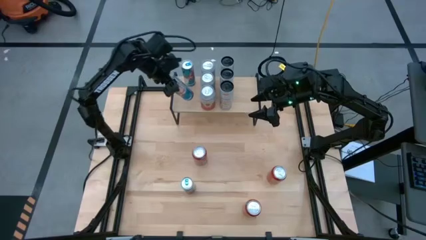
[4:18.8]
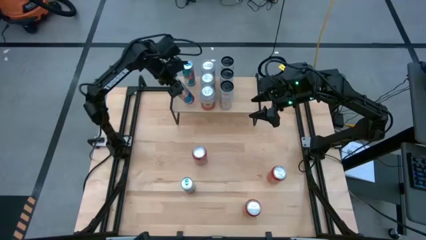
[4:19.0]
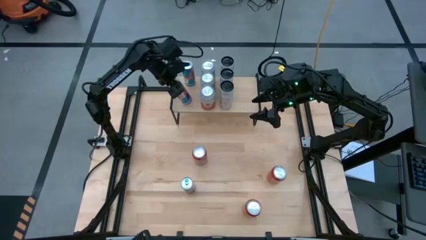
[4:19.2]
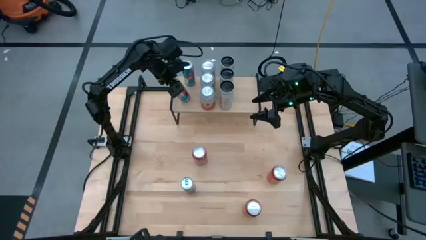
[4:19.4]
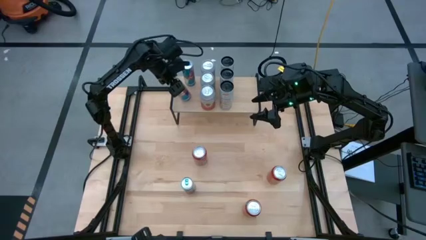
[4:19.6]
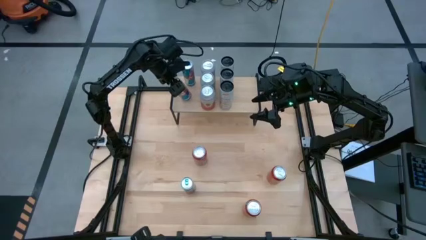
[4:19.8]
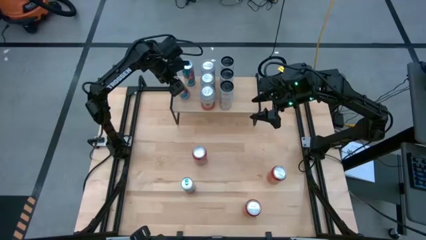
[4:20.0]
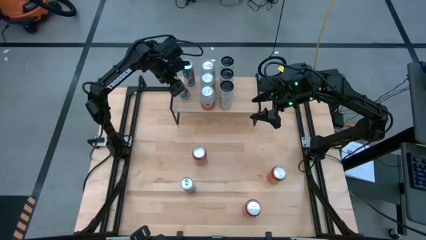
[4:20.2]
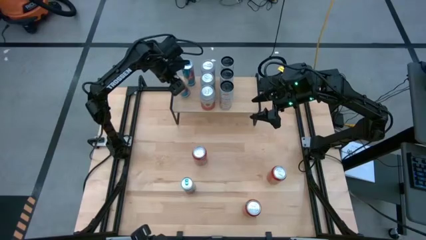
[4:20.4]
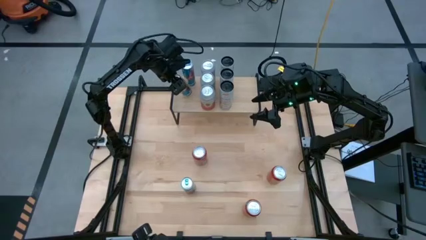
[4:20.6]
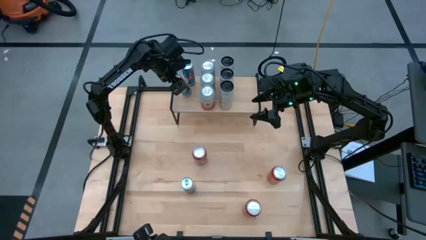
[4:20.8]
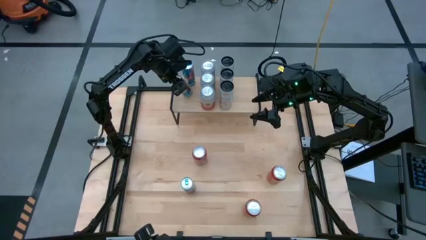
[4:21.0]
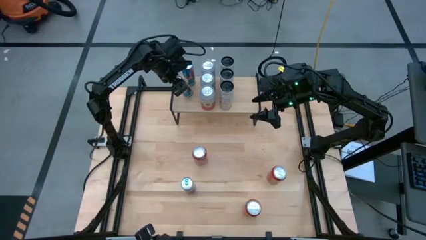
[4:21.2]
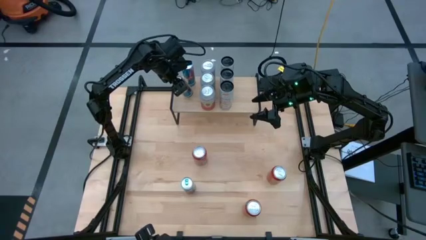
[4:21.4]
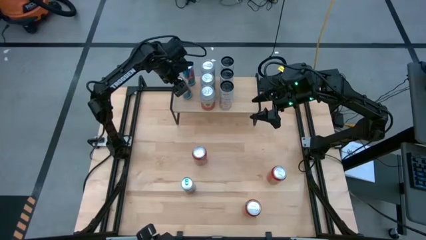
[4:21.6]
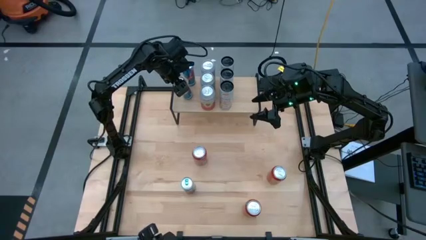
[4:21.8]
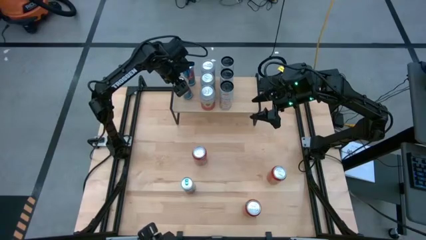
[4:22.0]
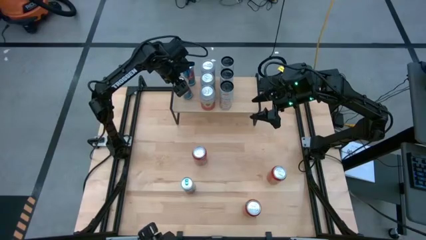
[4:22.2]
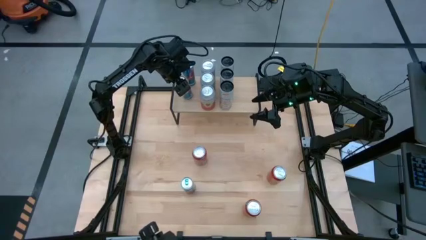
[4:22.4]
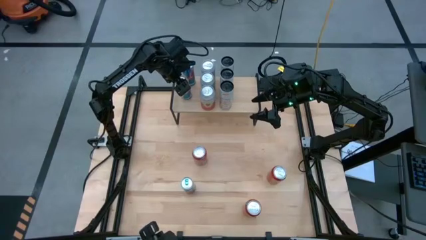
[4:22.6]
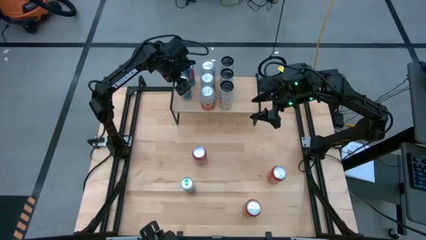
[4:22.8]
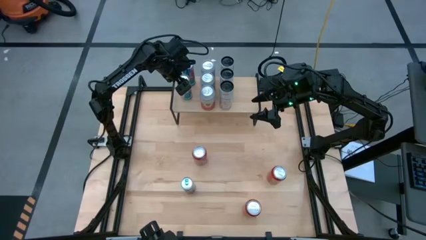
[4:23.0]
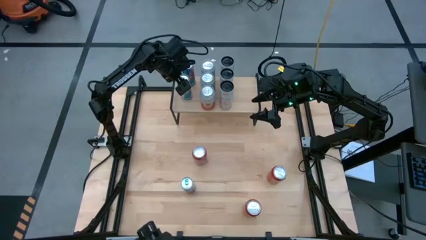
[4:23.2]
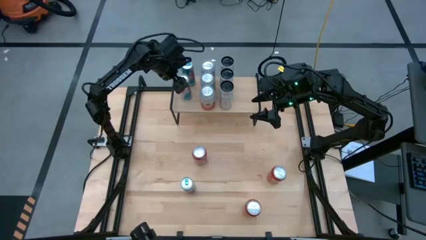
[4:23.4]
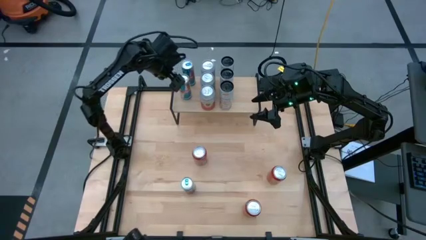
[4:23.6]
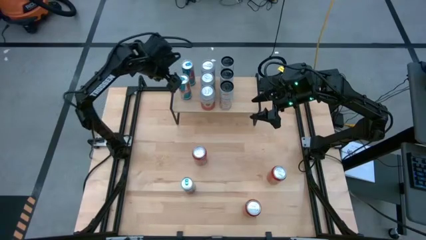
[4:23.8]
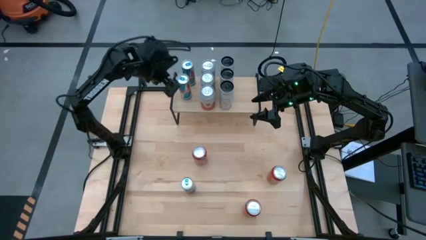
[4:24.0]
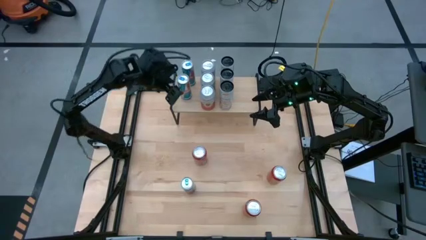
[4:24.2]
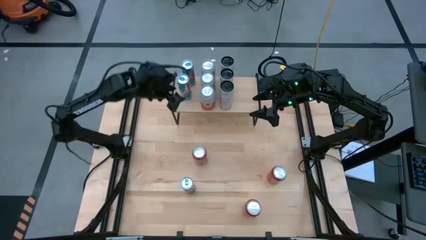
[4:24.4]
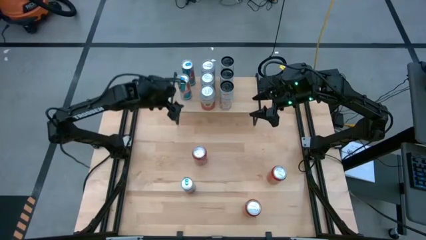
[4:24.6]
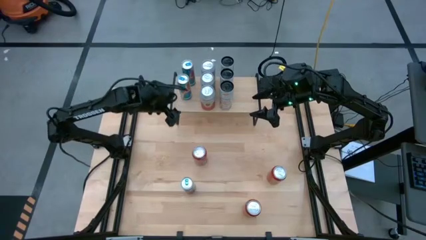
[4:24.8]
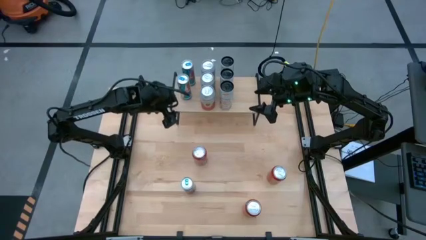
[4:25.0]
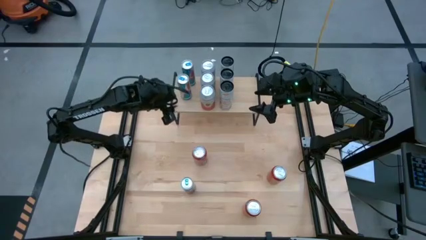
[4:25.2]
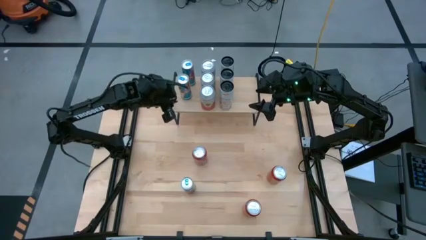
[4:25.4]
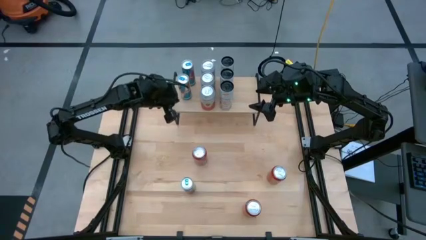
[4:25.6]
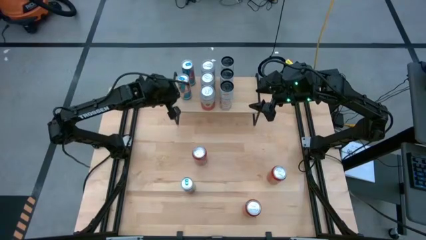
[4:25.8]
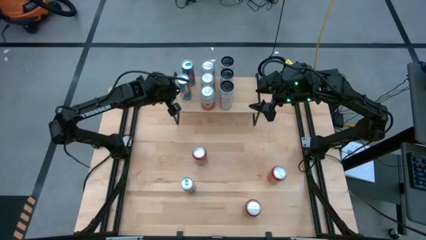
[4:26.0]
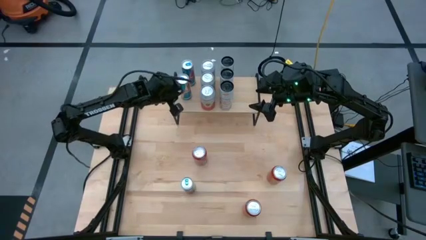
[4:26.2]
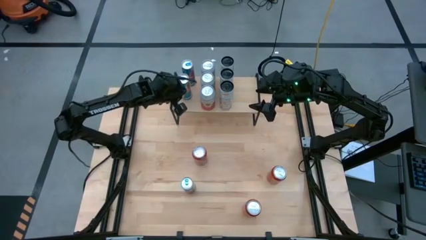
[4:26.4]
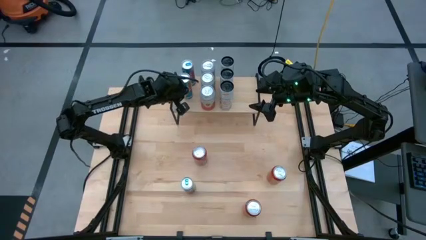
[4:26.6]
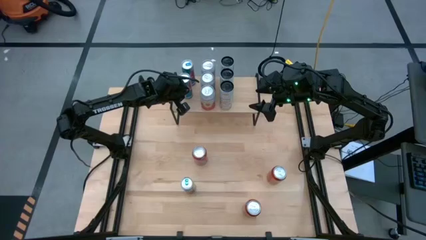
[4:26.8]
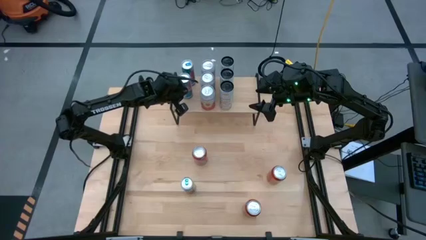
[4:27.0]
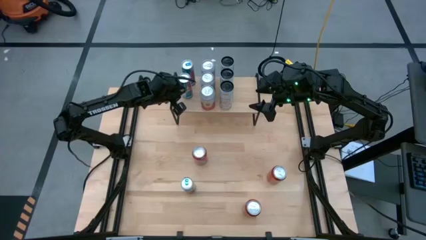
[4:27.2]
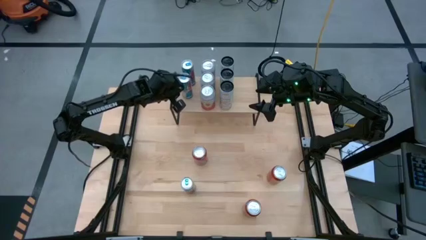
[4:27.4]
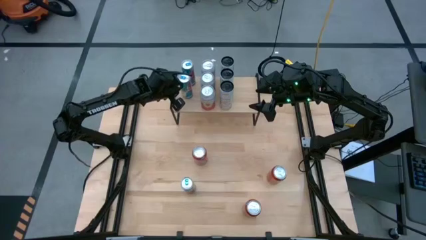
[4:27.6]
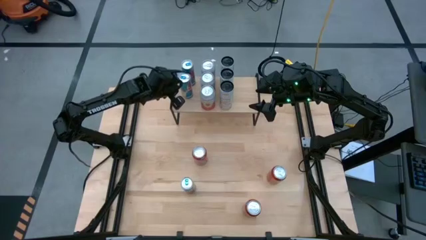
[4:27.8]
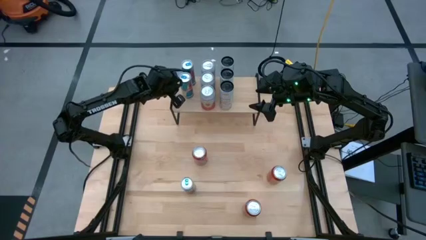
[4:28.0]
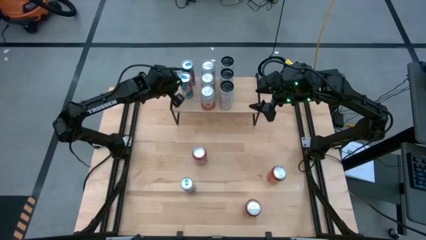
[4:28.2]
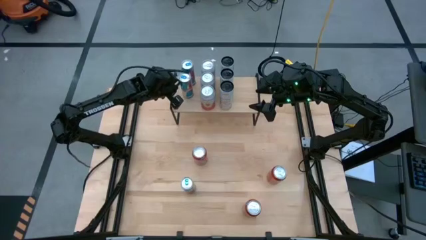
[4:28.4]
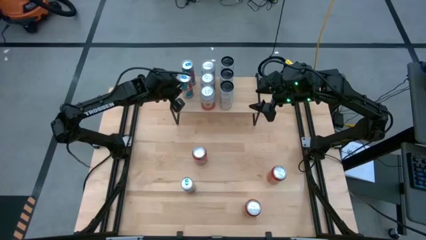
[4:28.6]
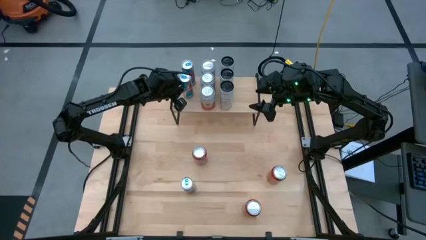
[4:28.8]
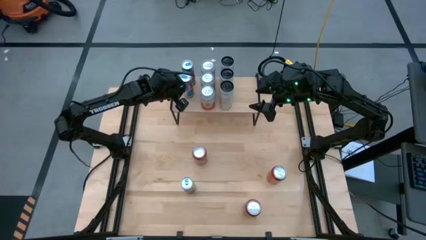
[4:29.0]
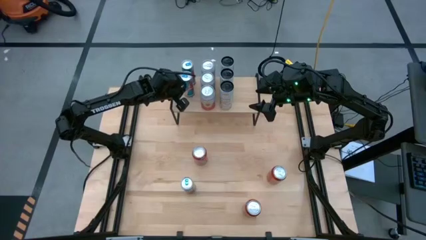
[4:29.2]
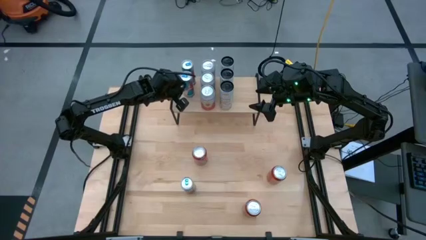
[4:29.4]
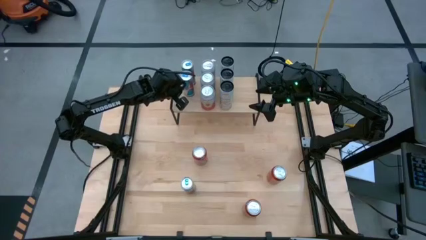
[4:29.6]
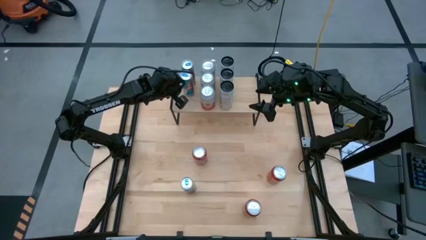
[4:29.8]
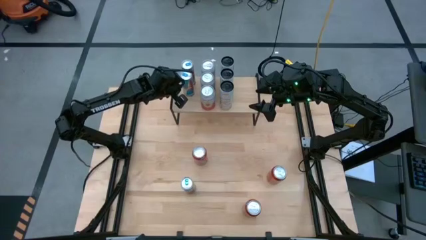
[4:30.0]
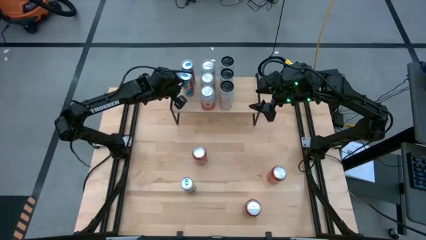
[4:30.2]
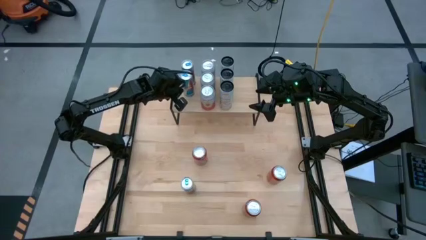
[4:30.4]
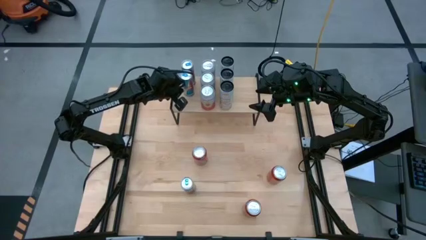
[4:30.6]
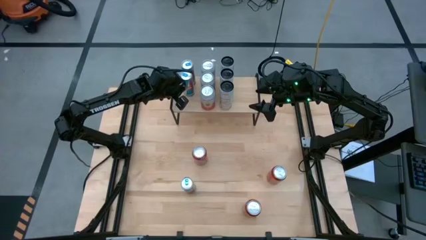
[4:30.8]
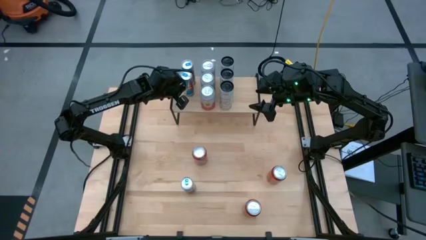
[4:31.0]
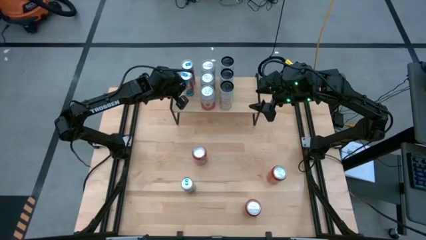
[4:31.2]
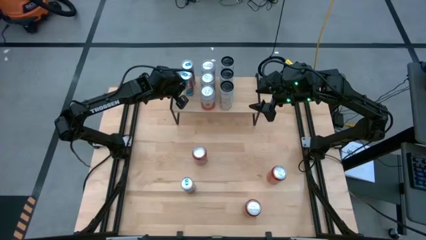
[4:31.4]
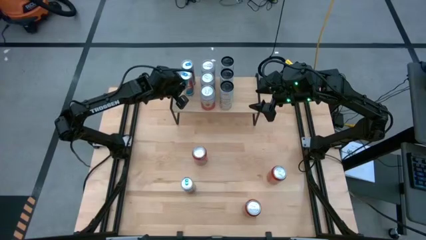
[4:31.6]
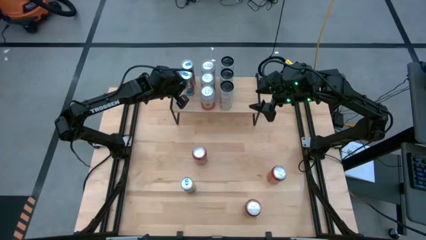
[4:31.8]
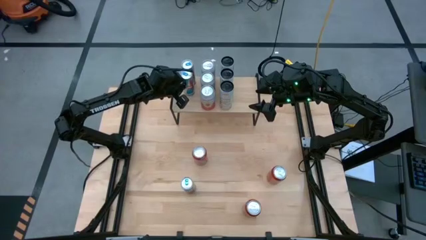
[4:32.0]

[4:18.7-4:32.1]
Task: Place canned beverage on shelf
Put the top blue soda can aligned with the other blue soda can on the shelf
